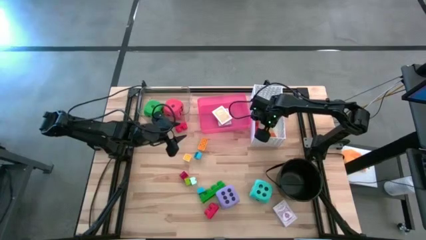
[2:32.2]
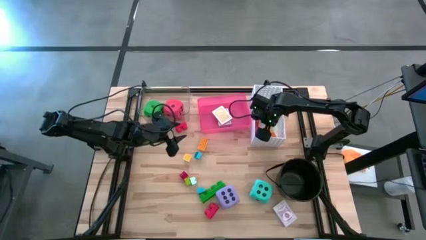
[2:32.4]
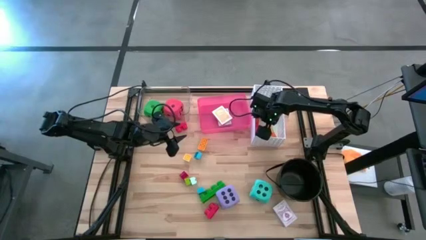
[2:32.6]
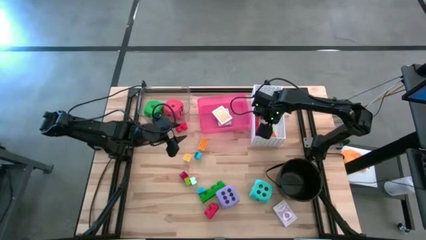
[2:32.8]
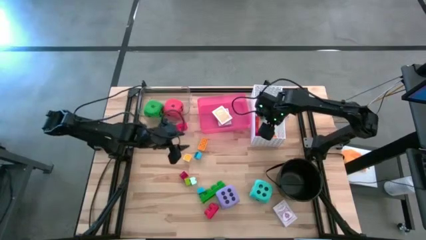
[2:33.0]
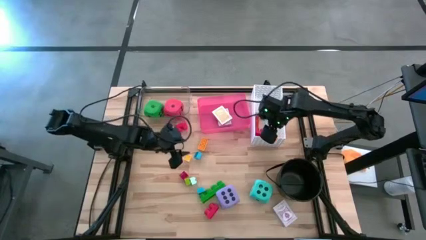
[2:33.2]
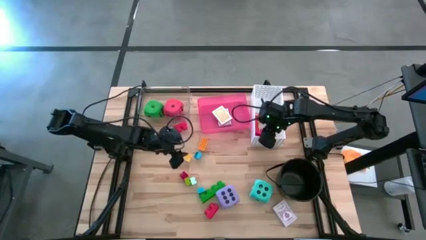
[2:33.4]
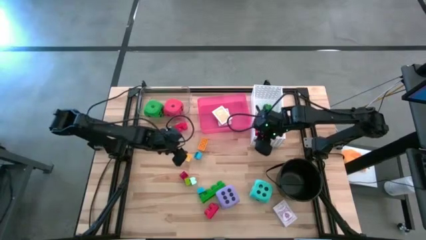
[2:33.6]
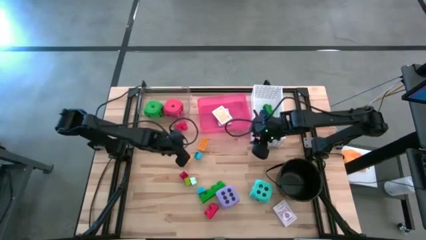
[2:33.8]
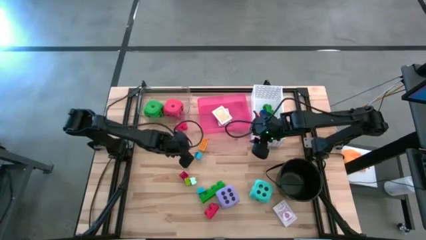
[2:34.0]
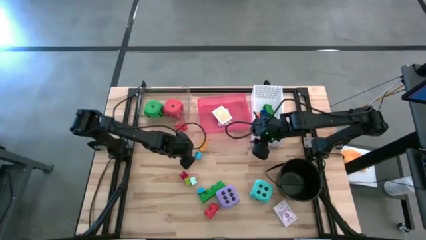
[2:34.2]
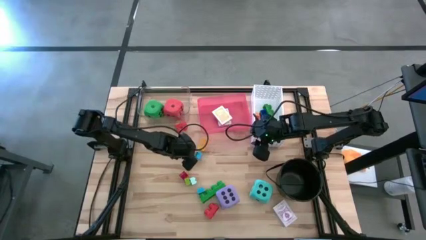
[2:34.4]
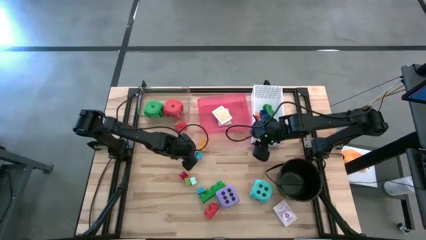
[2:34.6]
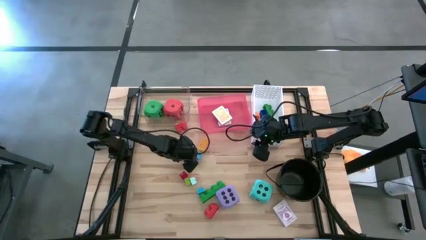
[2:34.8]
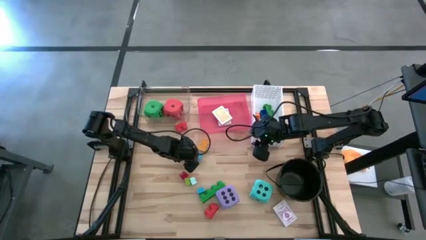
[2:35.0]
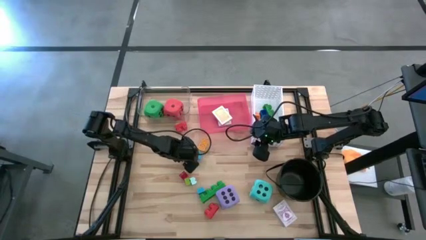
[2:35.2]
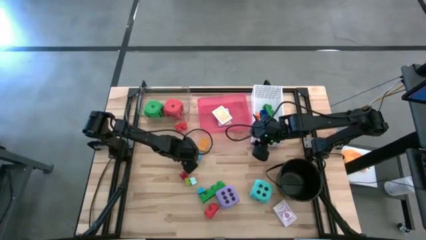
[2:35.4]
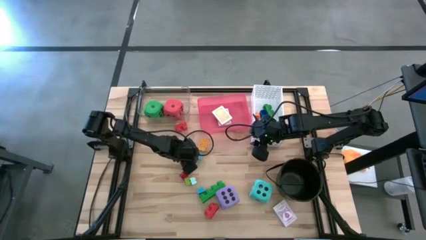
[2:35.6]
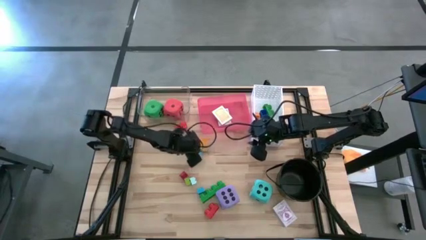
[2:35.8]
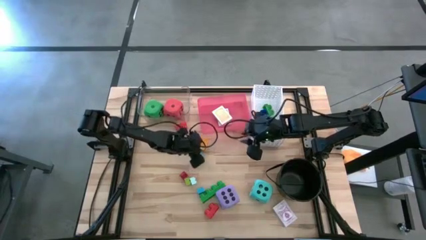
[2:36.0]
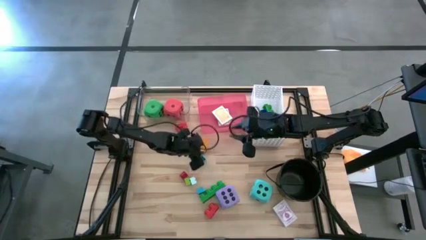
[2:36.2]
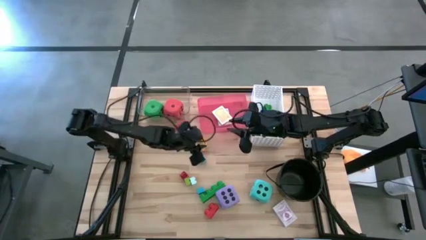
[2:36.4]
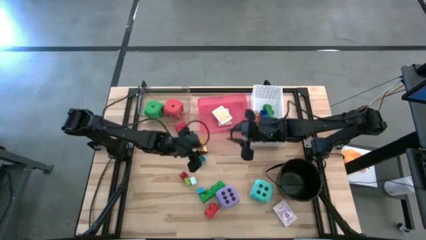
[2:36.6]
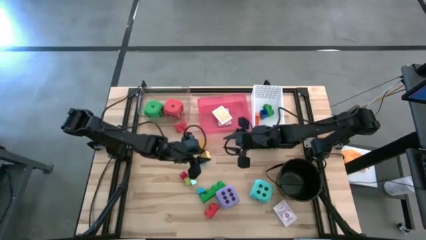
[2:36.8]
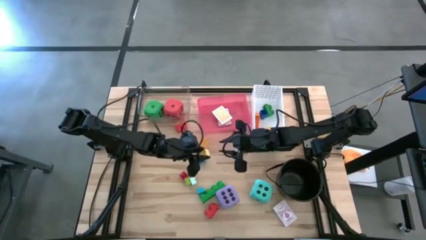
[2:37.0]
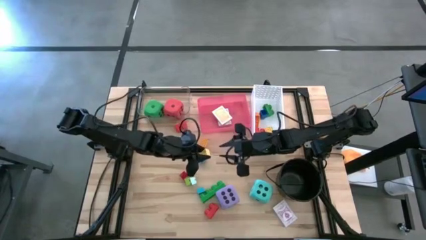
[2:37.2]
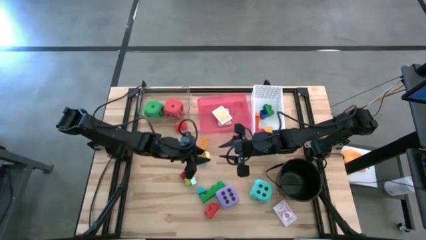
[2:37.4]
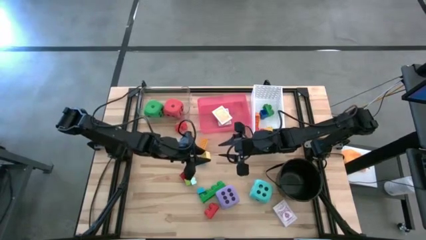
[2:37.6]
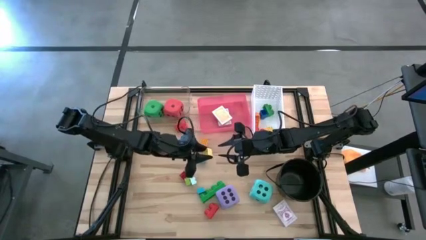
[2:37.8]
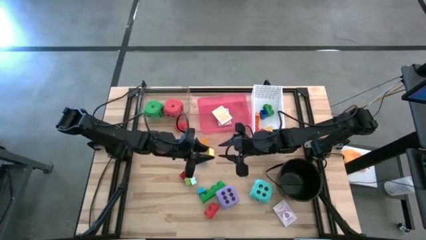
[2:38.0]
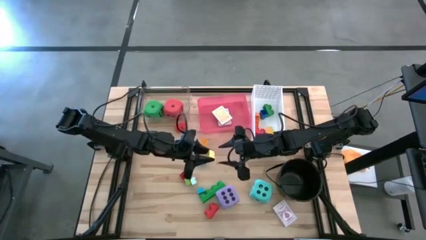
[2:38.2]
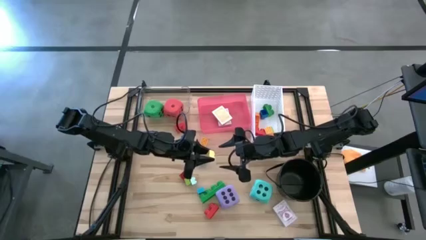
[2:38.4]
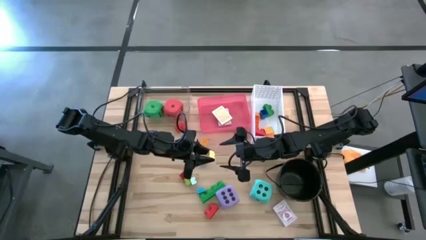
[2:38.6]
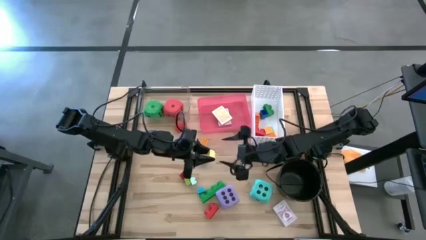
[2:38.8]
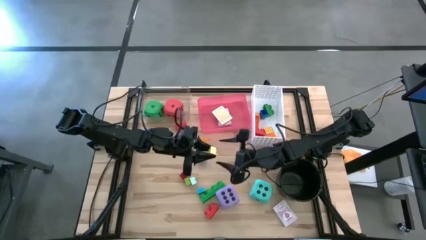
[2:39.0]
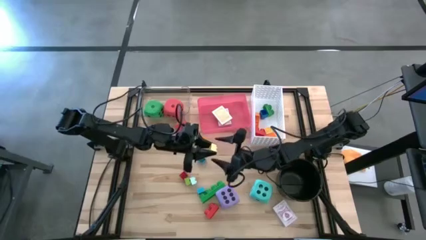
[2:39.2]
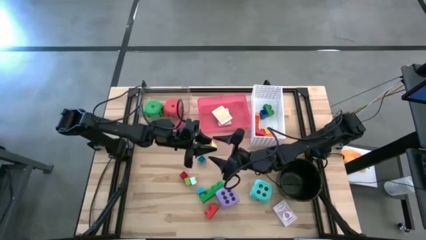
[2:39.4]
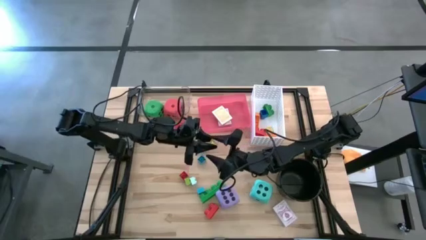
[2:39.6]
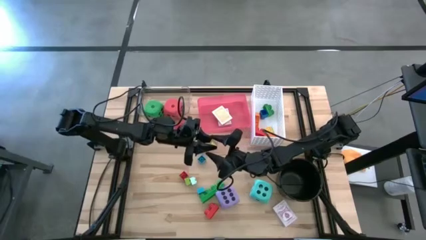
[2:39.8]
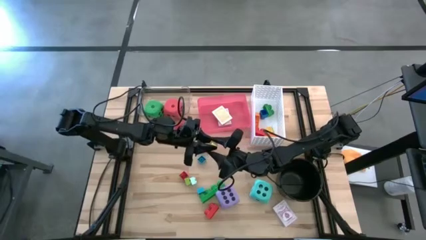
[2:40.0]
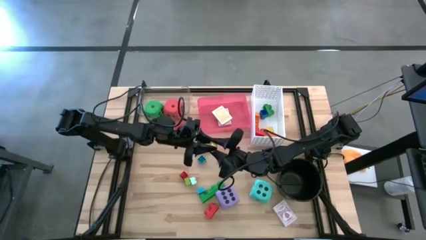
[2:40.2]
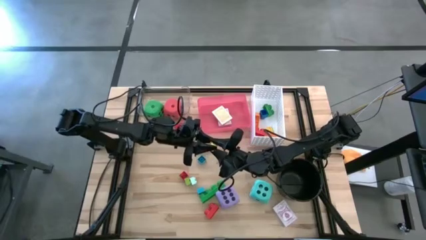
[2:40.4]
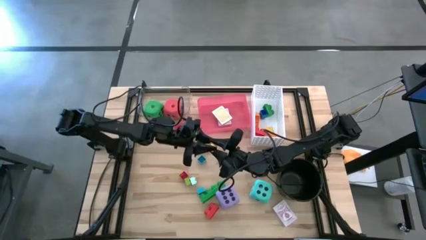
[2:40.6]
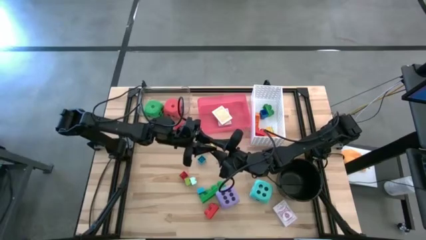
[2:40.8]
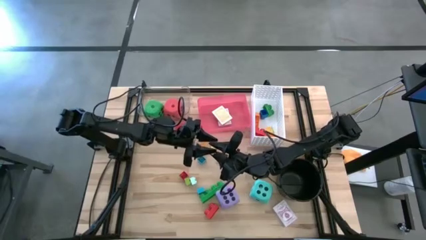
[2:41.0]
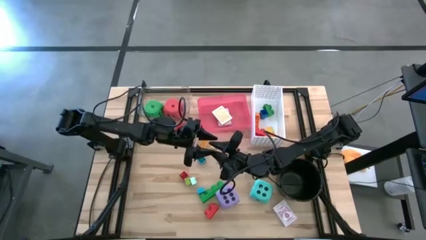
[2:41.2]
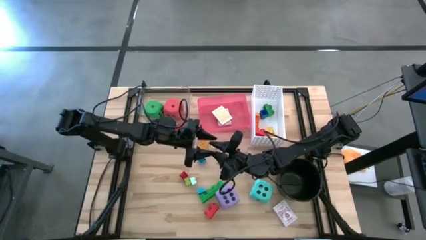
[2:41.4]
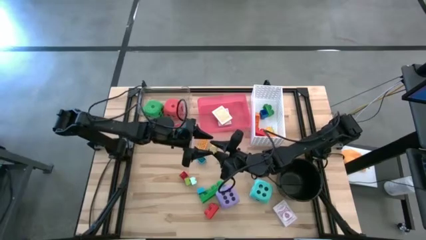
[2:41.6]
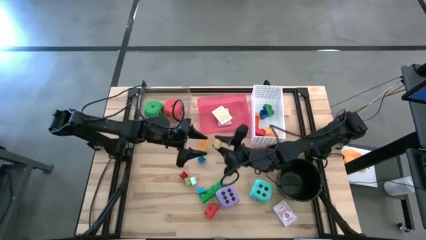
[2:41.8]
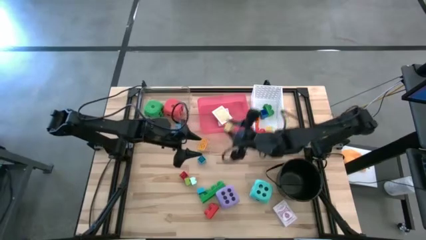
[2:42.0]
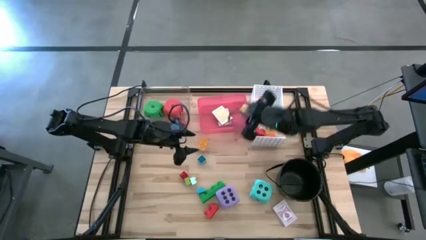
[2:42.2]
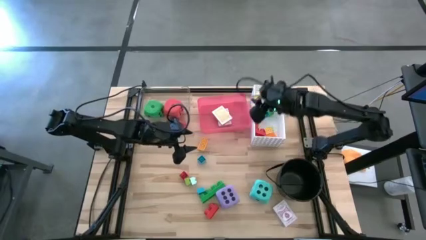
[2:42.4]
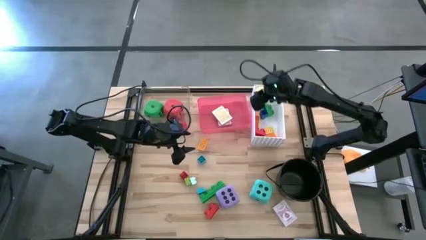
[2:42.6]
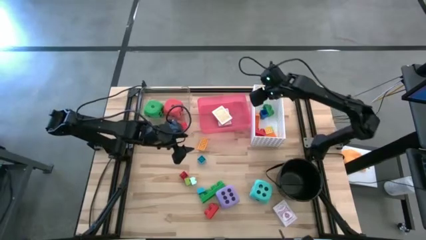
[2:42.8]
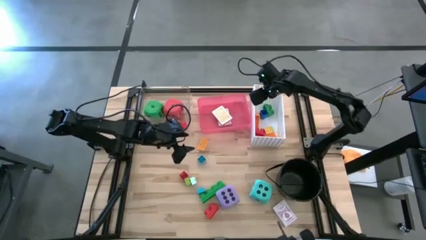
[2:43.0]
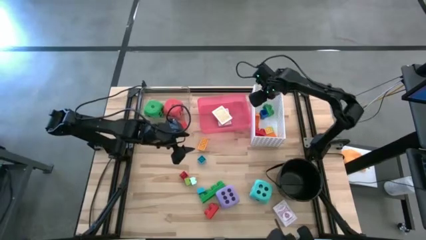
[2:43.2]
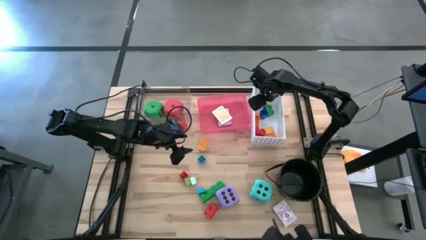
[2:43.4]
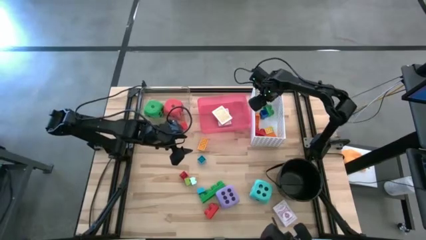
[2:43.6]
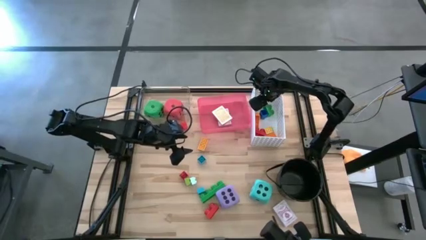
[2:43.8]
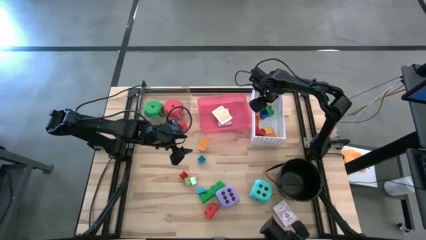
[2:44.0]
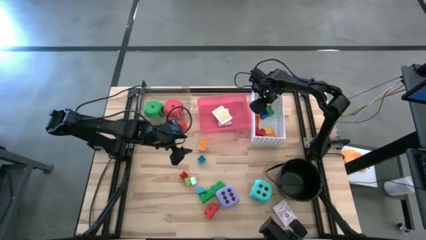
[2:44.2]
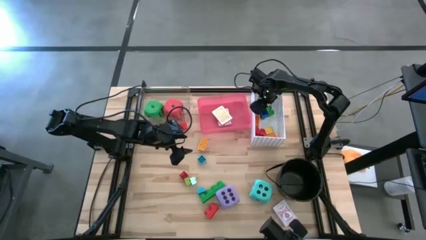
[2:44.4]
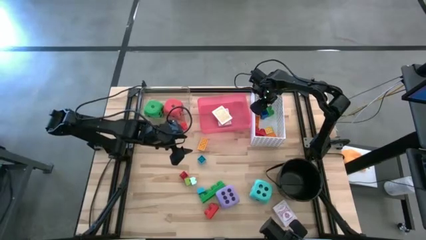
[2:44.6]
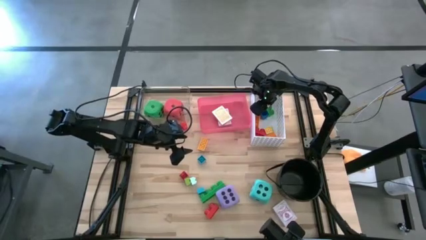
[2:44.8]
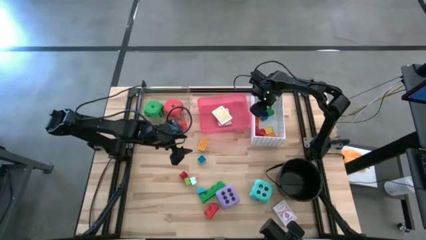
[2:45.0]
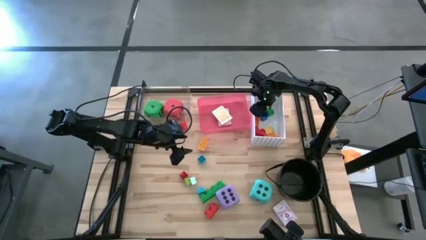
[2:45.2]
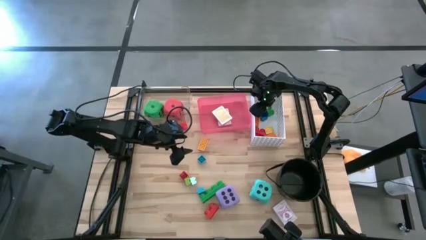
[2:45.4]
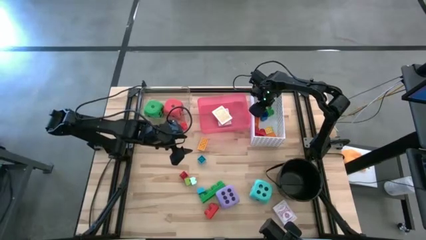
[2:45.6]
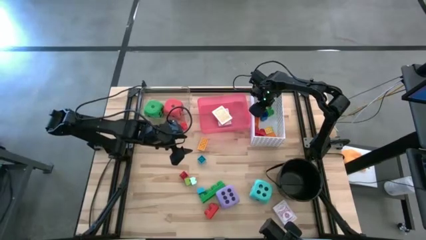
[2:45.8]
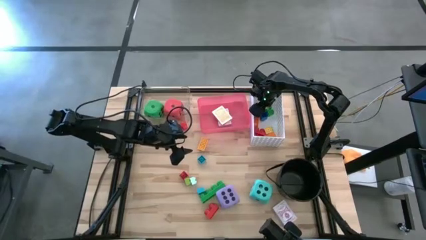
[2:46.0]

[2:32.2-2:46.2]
Task: Pick & Place Toys
Put the small light yellow game piece into the white bin

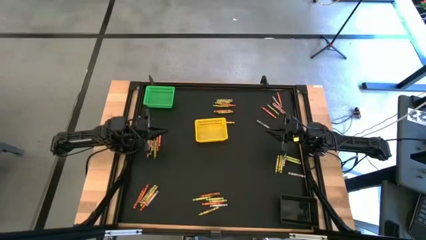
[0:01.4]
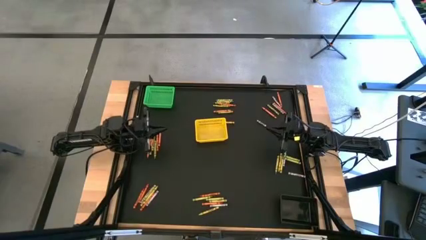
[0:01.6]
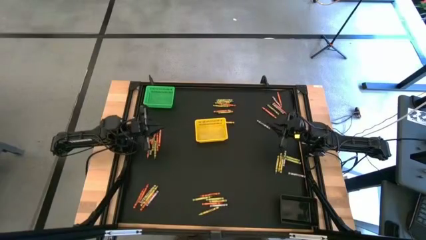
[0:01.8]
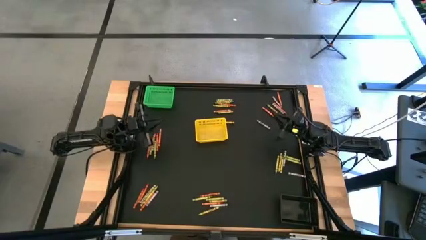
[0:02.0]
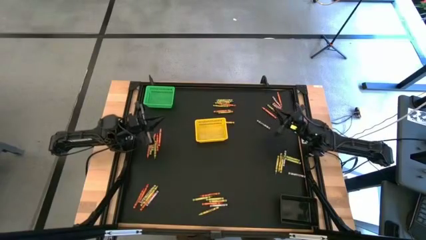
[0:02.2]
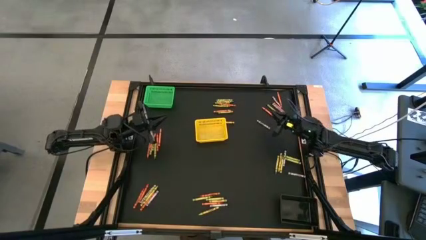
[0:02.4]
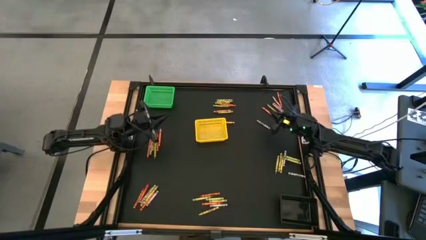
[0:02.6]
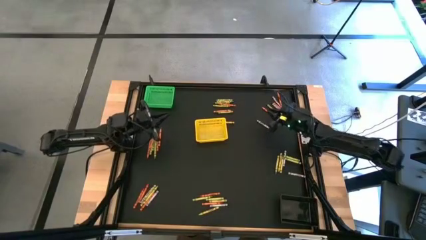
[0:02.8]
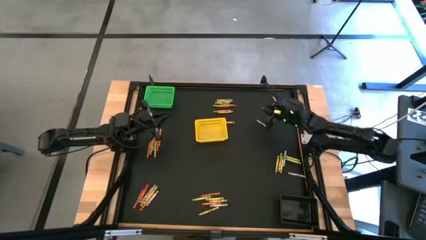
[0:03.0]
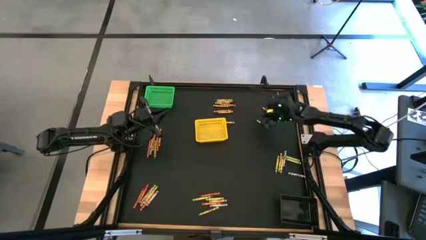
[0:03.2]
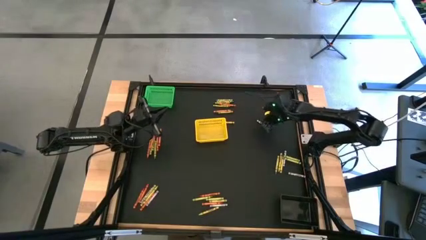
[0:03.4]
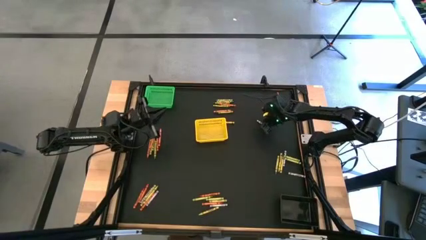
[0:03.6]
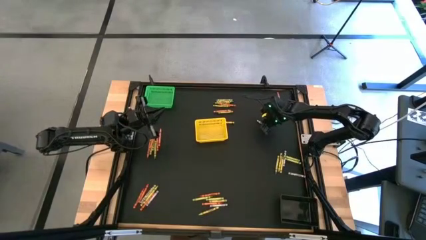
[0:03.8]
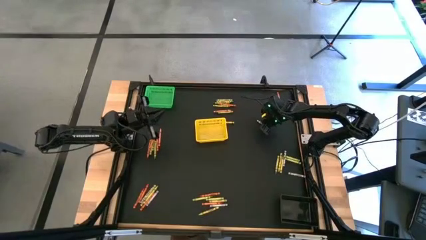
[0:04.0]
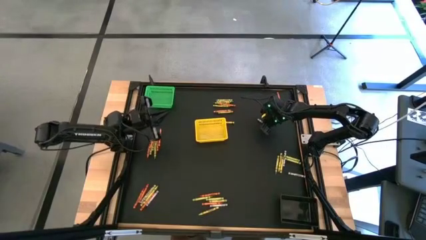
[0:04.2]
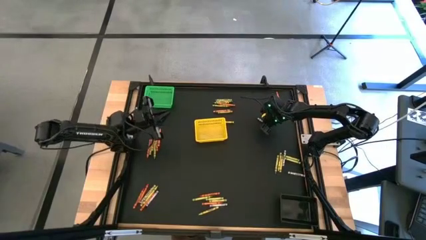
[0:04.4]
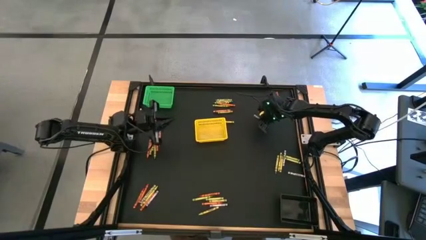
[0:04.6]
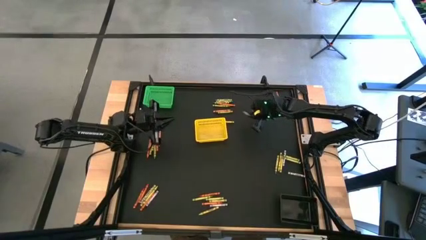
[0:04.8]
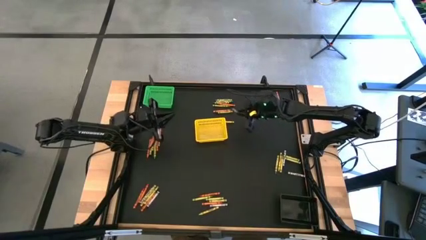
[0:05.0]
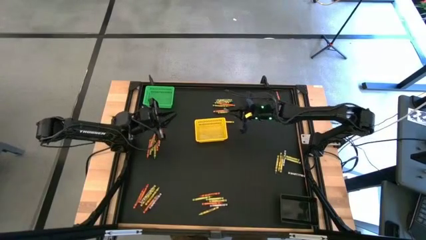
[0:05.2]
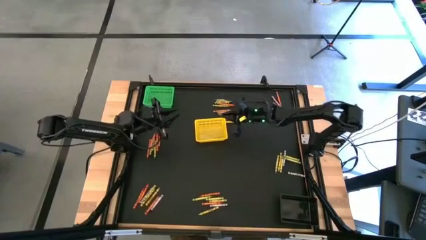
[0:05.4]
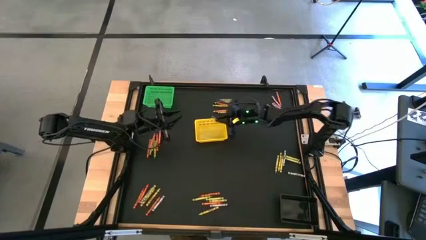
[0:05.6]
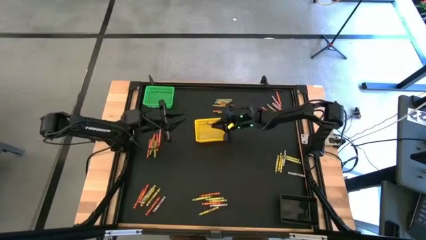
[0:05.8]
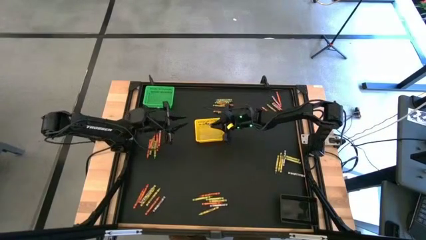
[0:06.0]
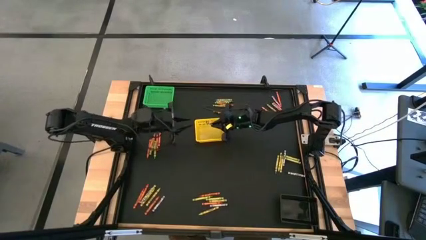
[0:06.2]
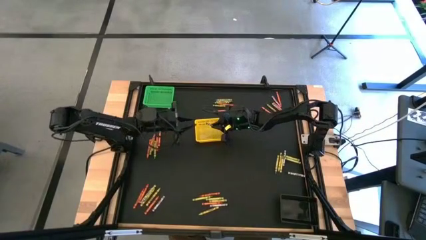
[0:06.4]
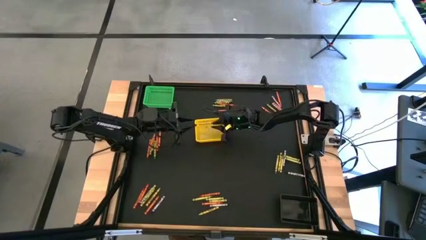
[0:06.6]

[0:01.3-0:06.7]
Task: Sort crayons
Put the black crayon into the yellow bin
